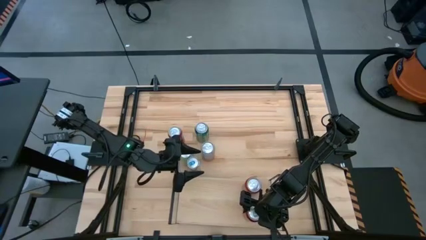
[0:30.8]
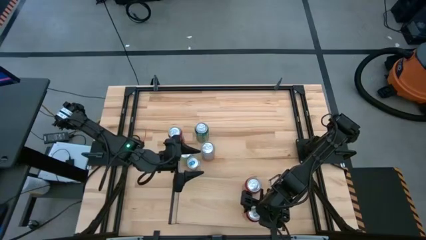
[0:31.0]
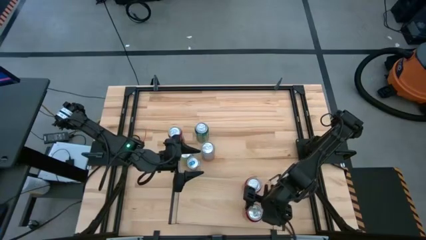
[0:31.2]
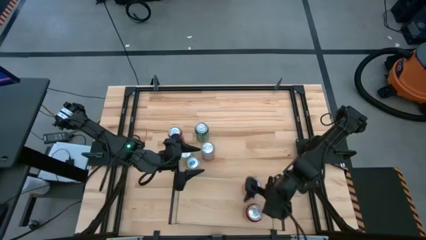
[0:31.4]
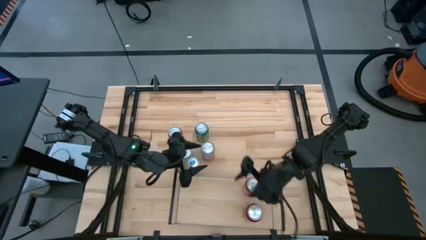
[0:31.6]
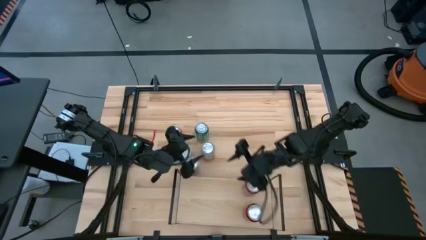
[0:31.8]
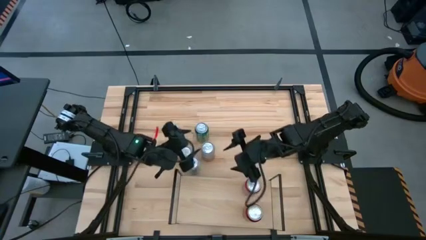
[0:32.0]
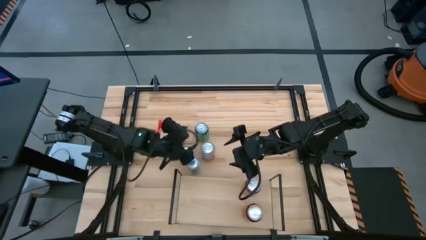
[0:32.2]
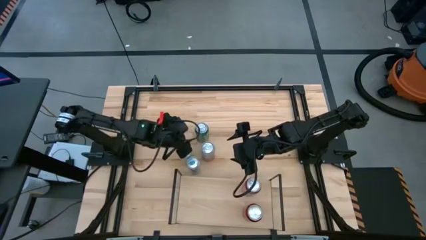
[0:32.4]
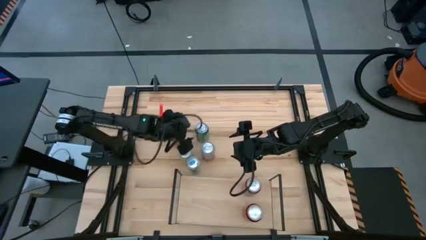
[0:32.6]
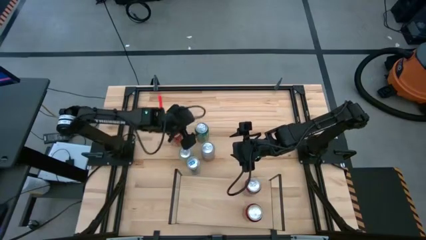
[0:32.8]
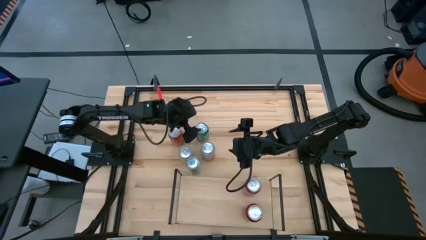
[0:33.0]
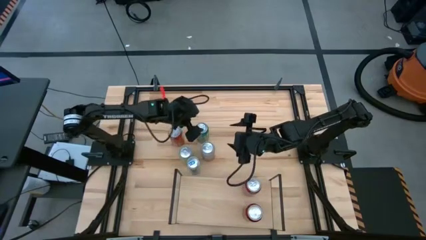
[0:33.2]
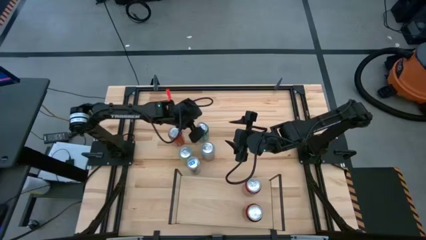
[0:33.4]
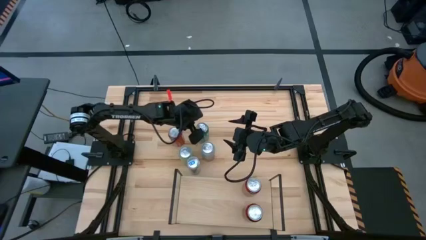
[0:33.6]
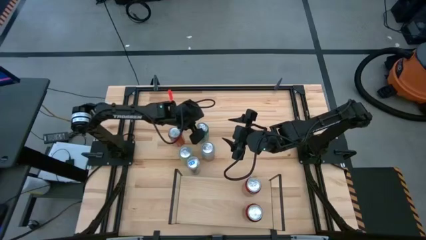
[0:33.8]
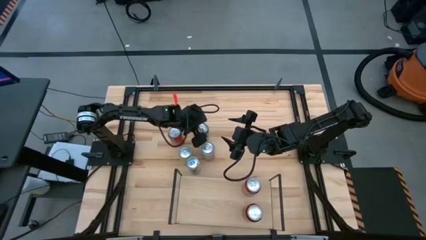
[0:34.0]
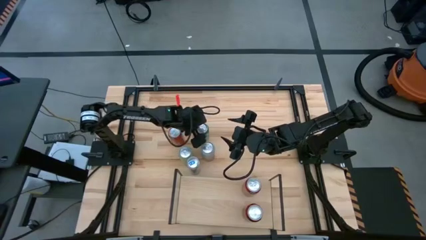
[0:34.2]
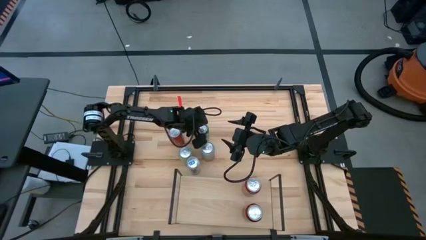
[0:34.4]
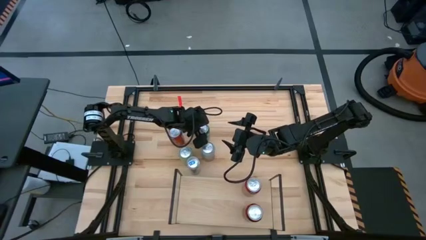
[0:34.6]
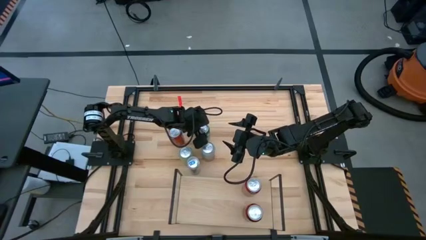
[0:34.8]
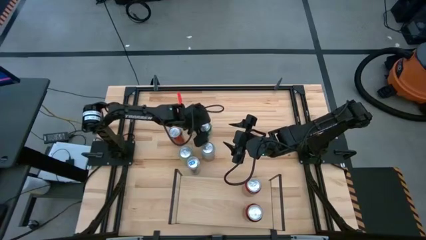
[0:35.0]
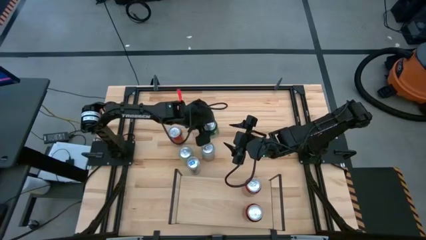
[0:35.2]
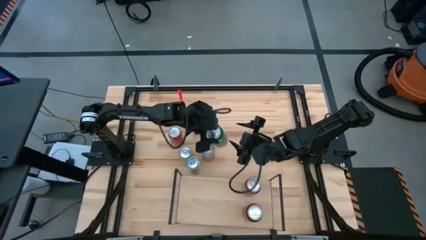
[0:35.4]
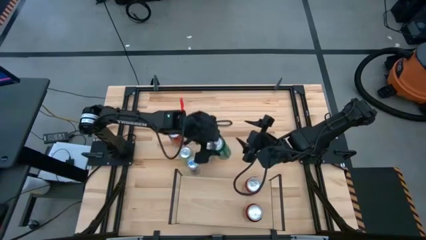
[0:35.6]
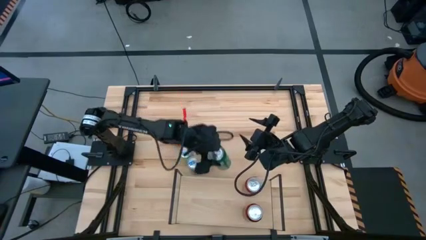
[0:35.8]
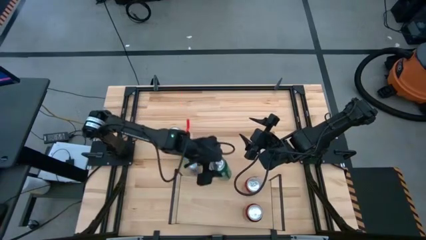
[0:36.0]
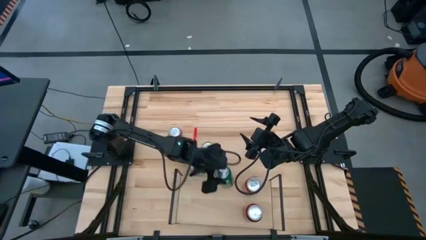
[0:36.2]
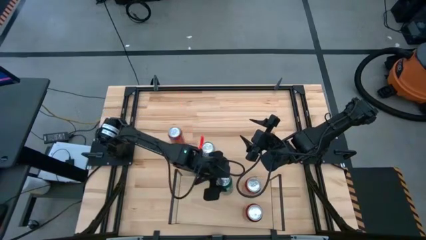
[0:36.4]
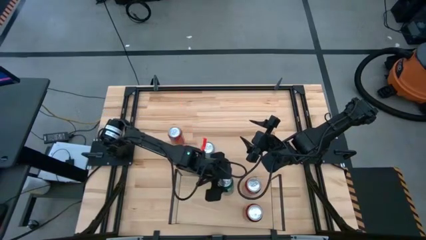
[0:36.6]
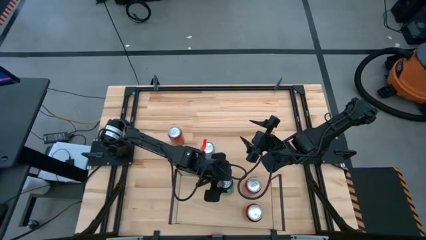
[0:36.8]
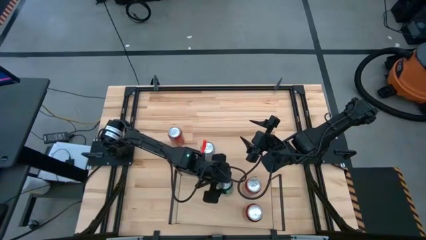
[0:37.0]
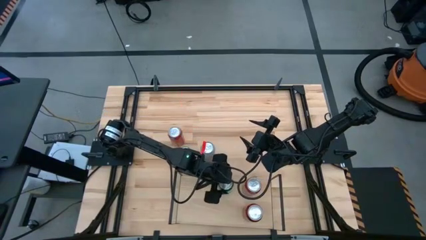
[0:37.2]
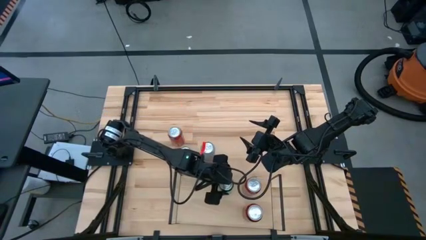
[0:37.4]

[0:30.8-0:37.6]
Task: Place canned beverage on shelf
Put the green soda can on the shelf

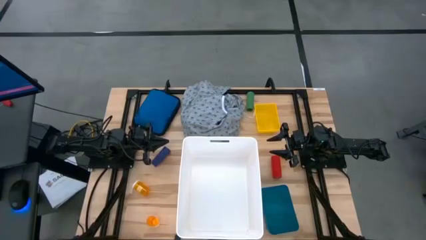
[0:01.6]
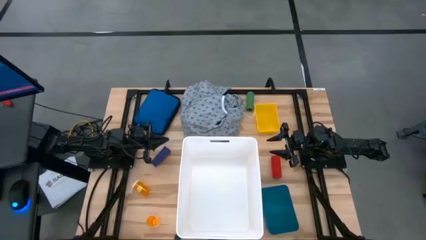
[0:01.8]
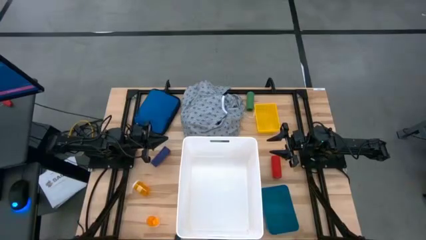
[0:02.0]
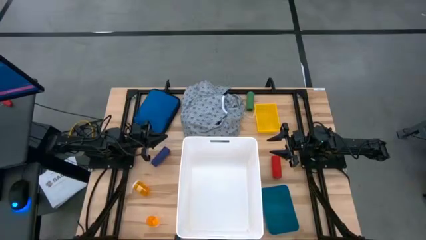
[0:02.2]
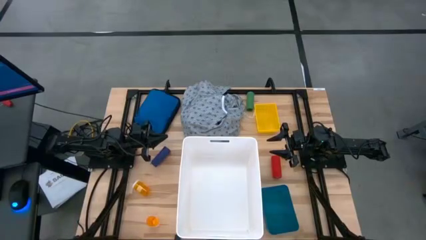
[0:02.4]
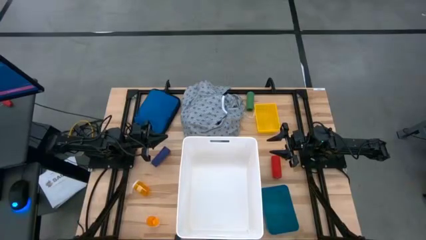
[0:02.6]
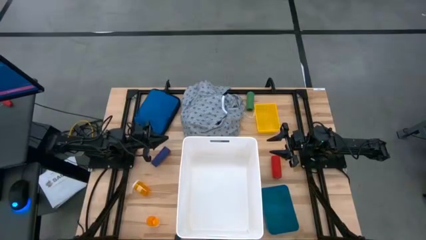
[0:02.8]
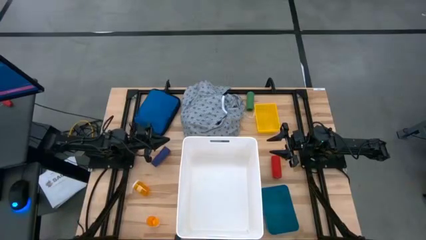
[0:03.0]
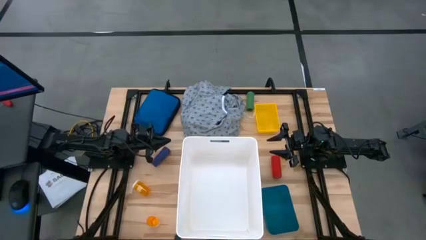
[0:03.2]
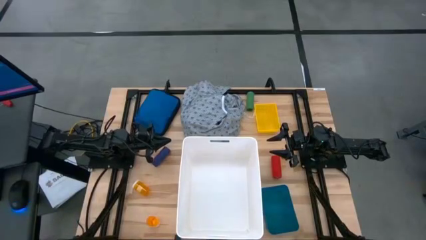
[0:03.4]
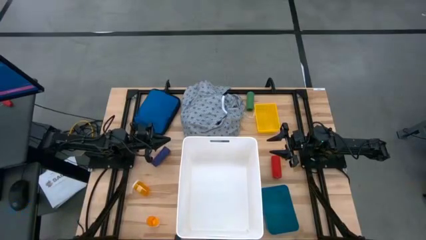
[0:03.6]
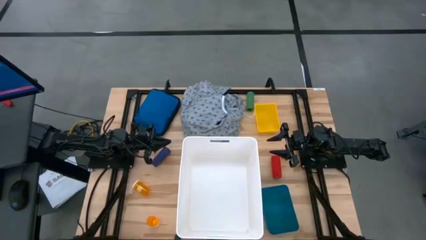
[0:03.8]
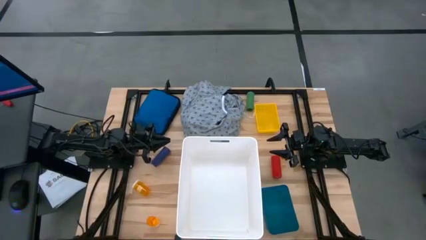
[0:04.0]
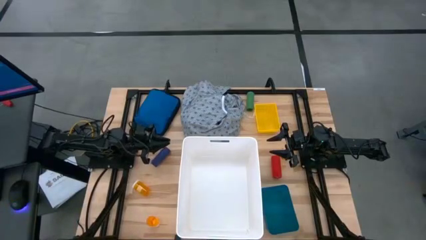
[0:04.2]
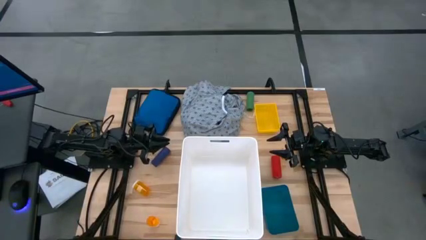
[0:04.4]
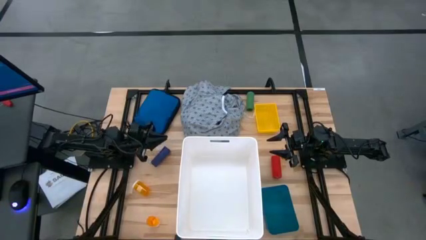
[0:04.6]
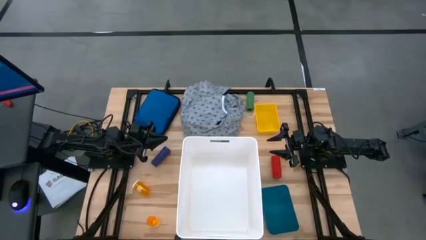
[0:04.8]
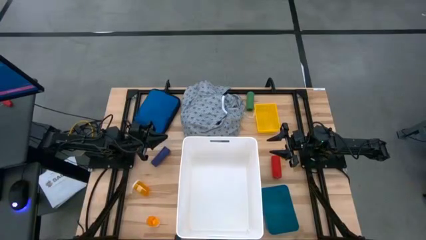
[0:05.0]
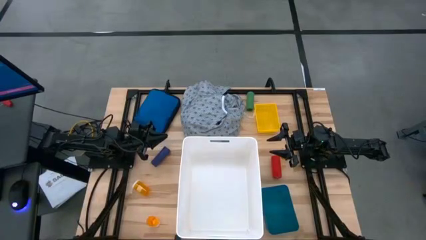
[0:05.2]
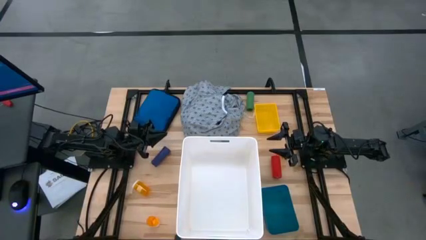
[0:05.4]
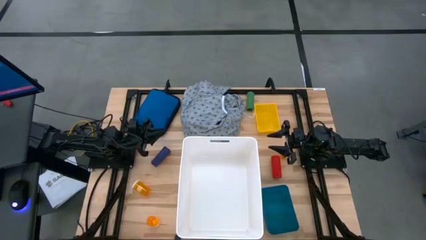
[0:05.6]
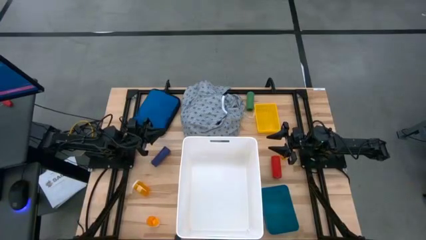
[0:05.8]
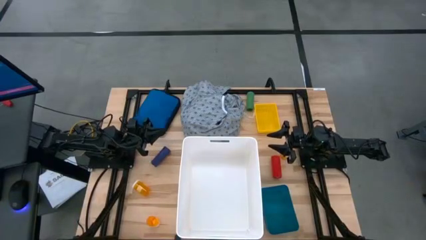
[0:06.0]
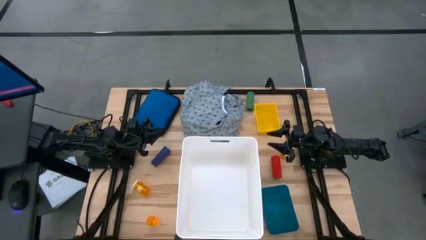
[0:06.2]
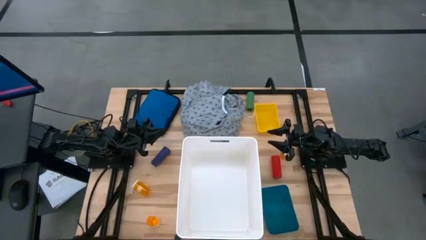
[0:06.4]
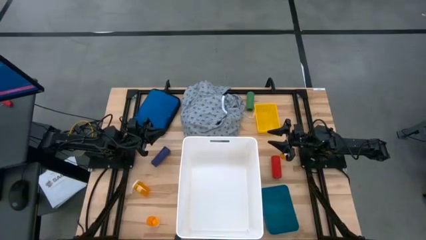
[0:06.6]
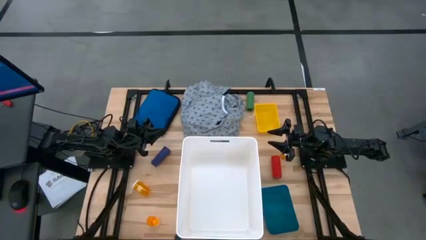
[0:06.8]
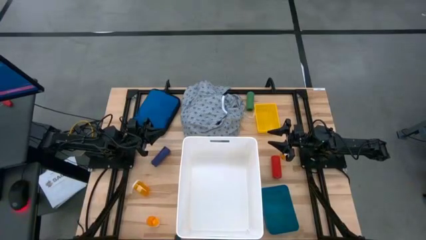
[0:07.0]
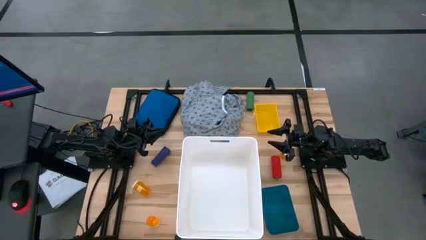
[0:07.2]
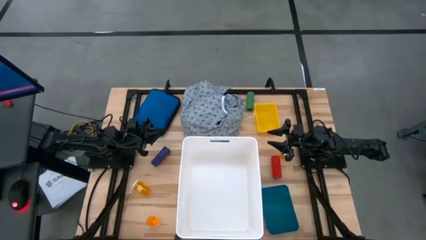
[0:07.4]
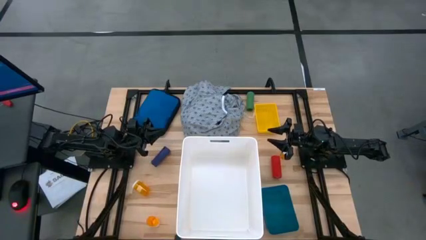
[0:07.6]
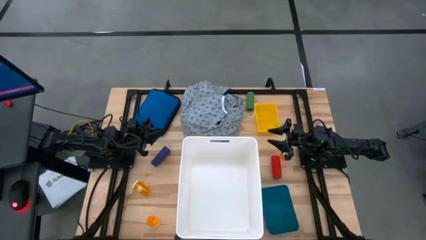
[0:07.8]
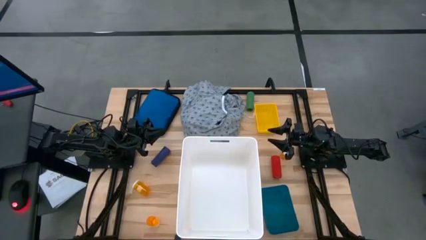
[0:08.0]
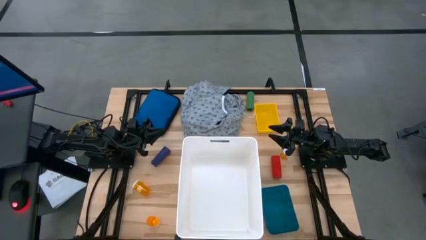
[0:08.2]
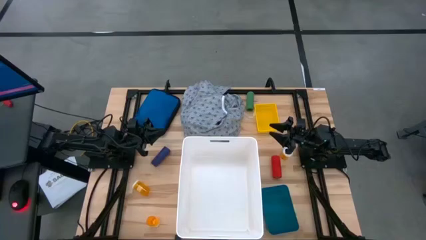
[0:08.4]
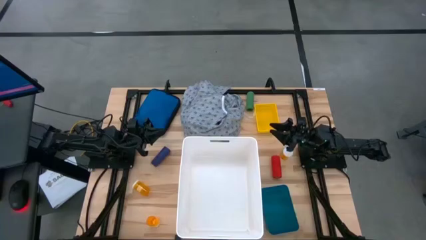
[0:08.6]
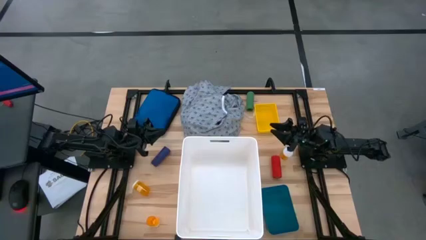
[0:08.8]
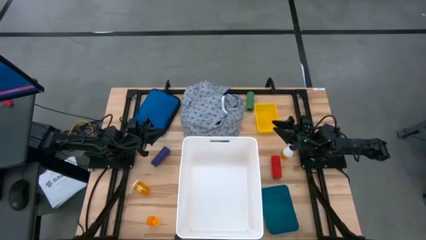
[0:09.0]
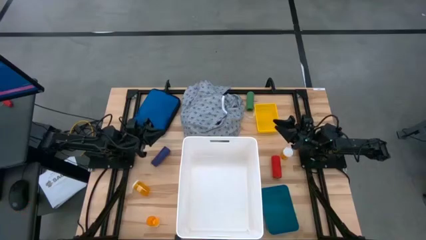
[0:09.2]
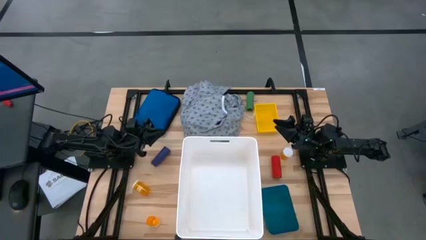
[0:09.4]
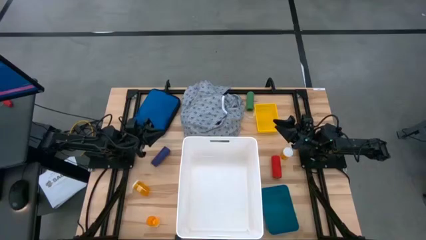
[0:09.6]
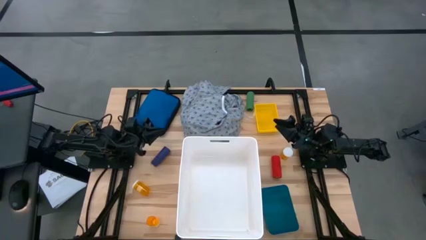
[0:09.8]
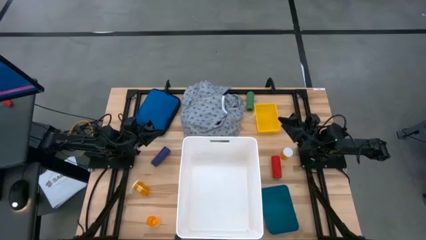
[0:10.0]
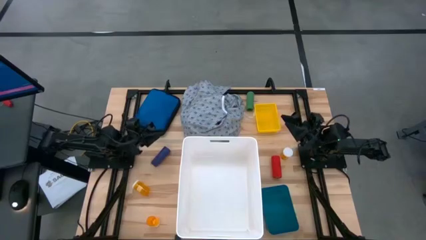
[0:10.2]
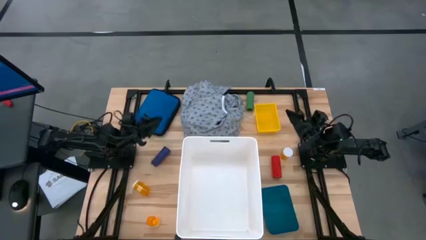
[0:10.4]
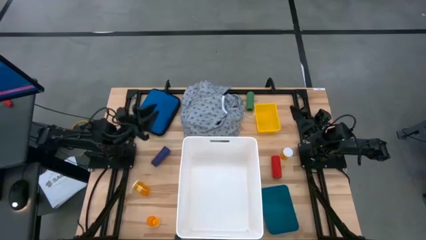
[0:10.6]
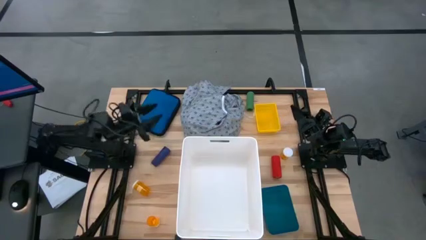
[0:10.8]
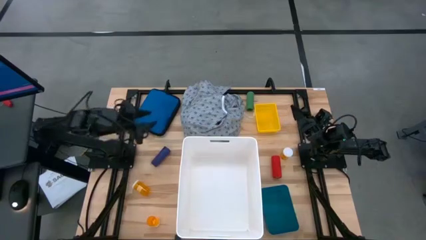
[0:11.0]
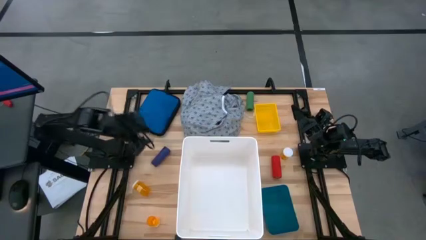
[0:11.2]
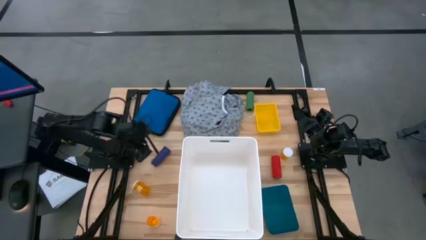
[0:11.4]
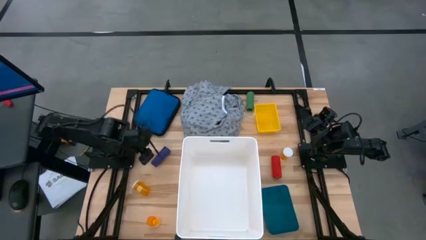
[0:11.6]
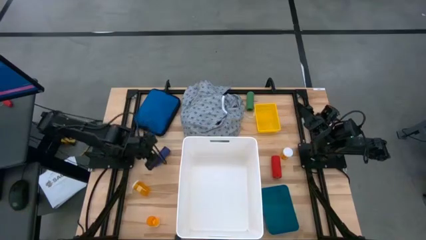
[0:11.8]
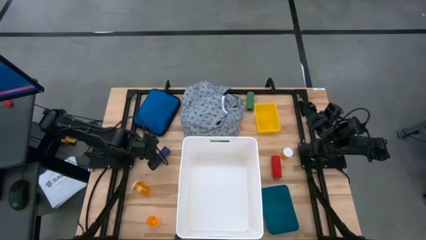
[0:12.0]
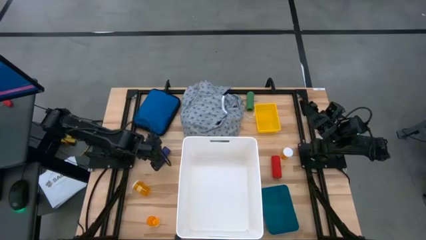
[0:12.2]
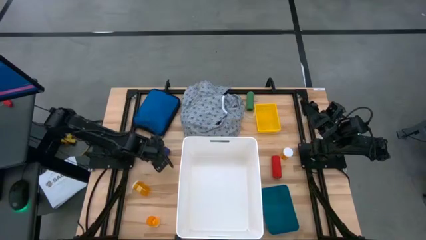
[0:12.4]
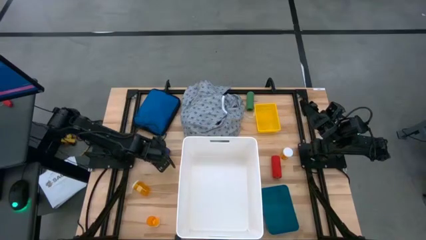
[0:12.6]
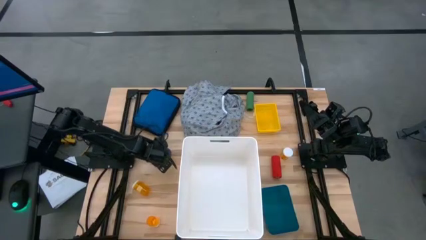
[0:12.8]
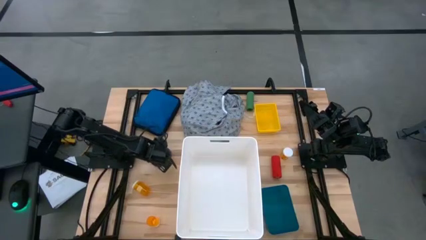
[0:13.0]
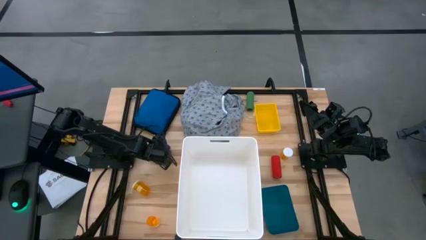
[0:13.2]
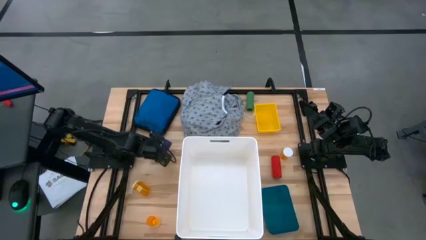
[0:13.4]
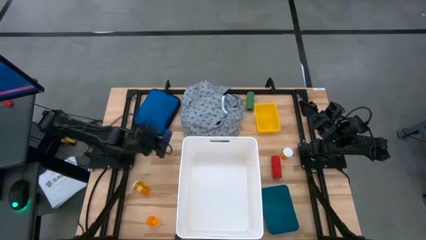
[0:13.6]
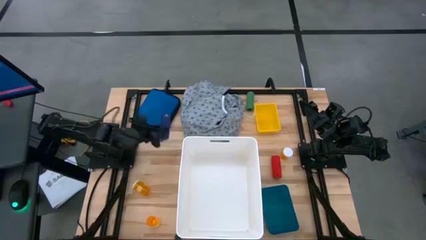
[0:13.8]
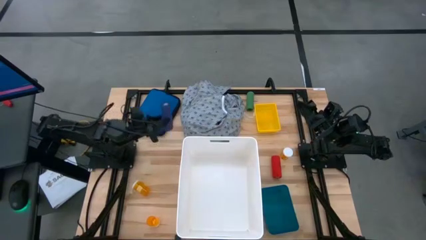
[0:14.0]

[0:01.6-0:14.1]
Task: Pick & place medical supplies in basket/bin
Put the blue bandage into the blue bin
